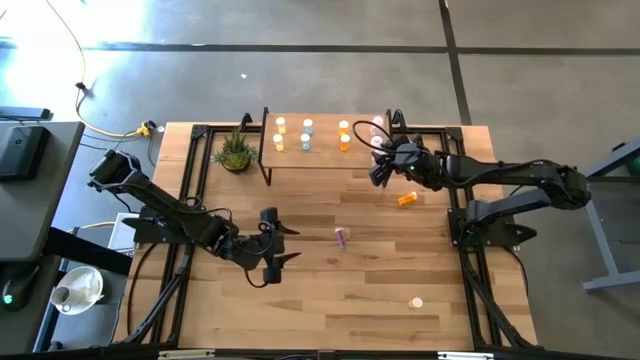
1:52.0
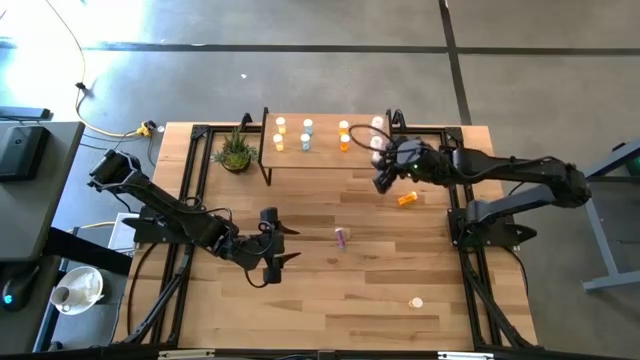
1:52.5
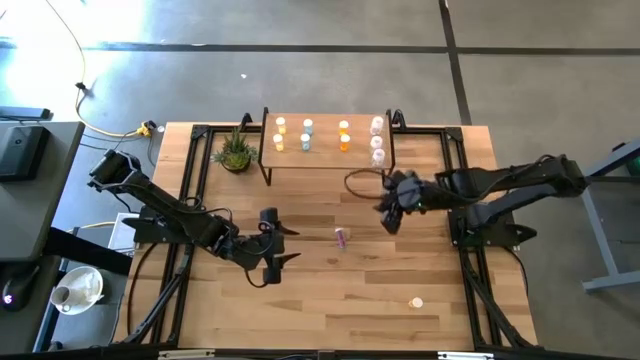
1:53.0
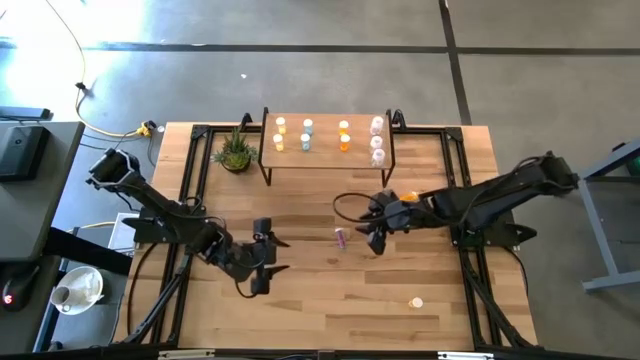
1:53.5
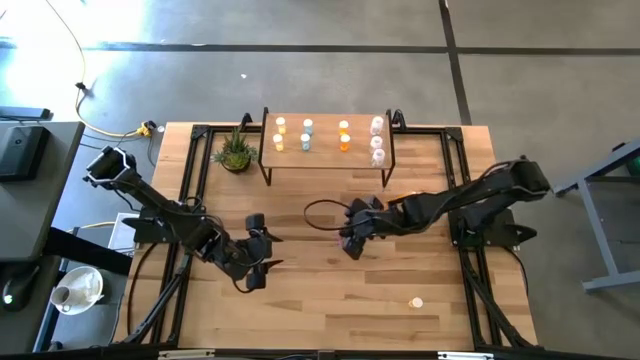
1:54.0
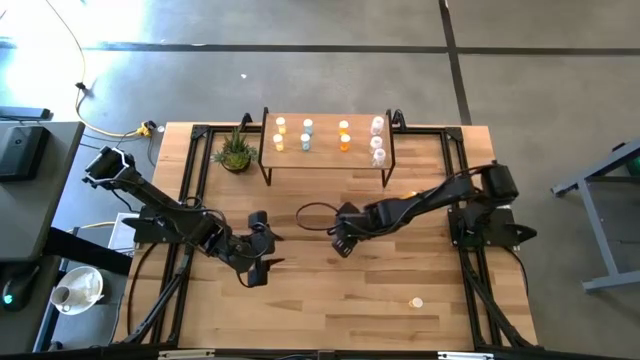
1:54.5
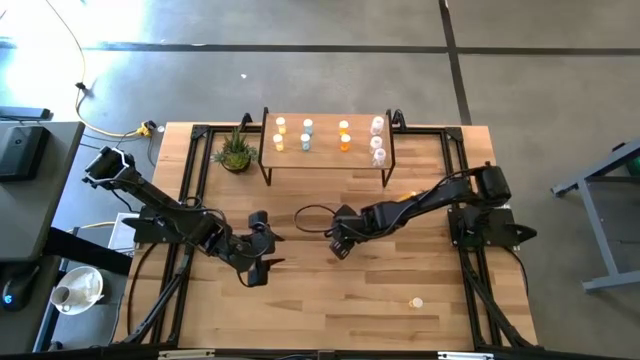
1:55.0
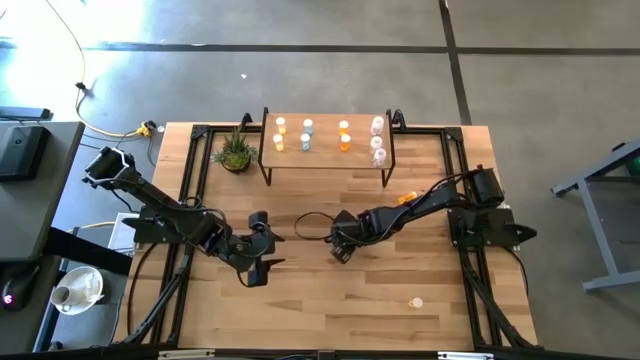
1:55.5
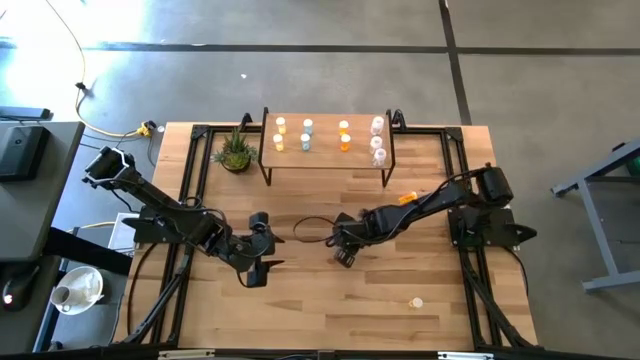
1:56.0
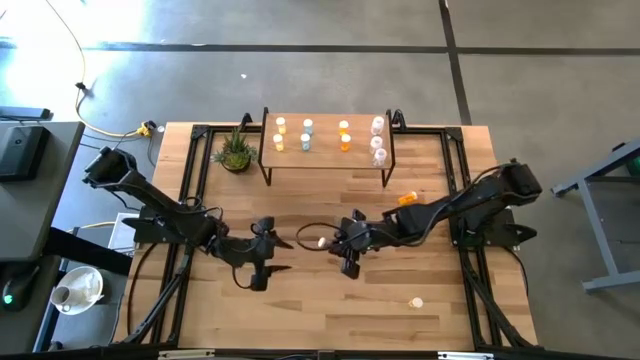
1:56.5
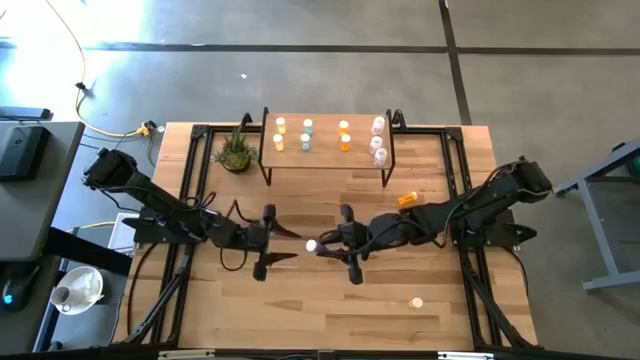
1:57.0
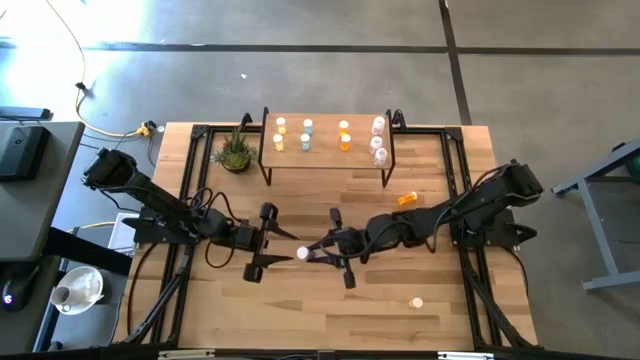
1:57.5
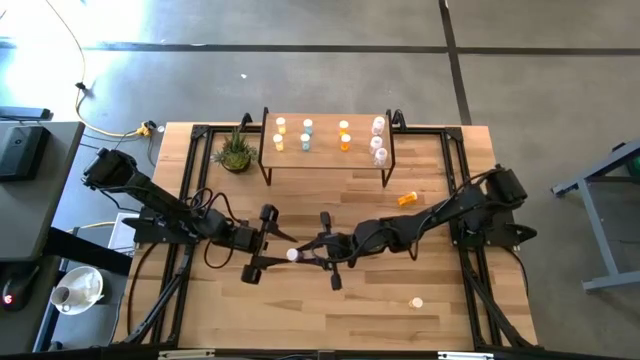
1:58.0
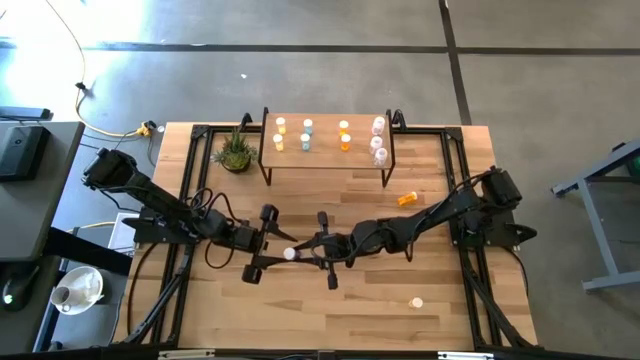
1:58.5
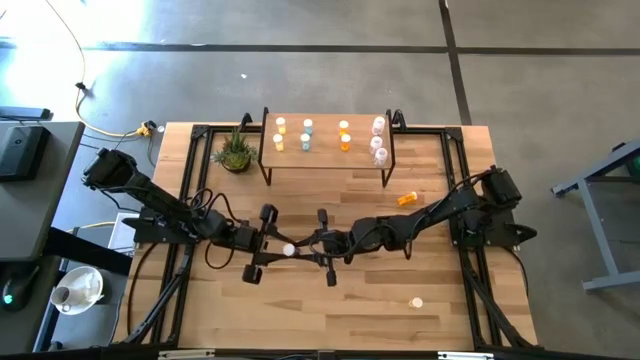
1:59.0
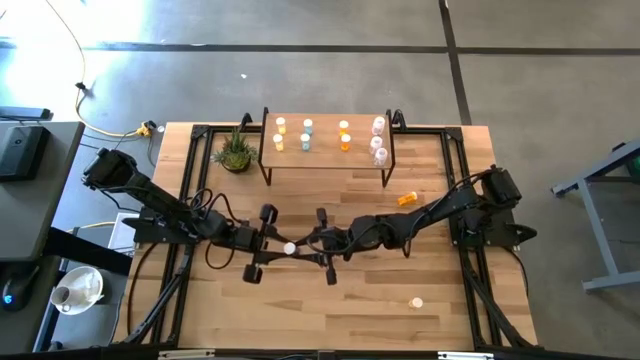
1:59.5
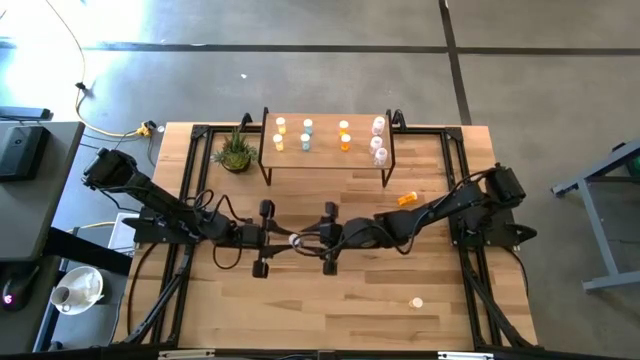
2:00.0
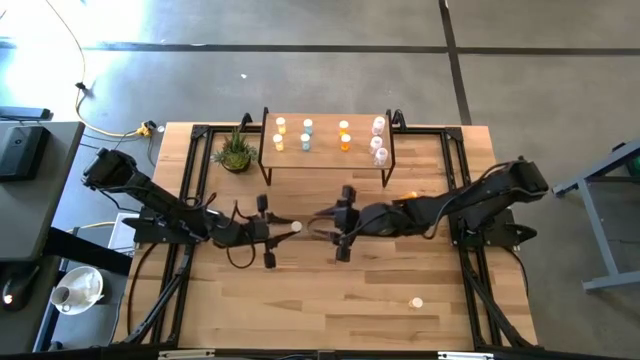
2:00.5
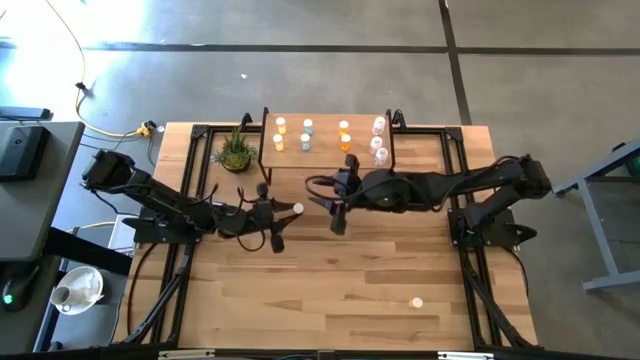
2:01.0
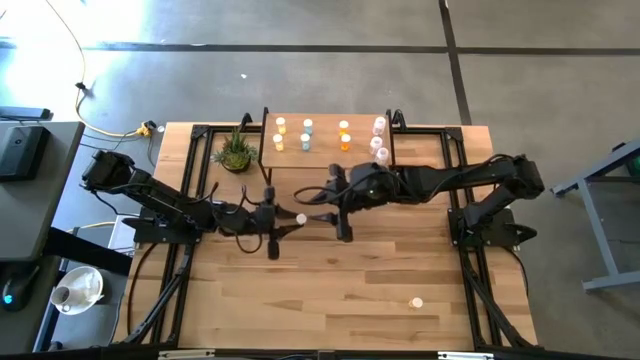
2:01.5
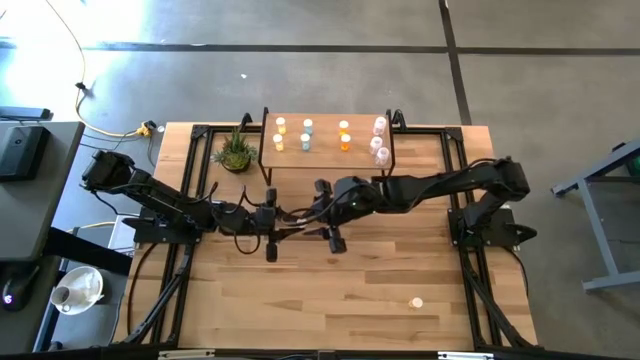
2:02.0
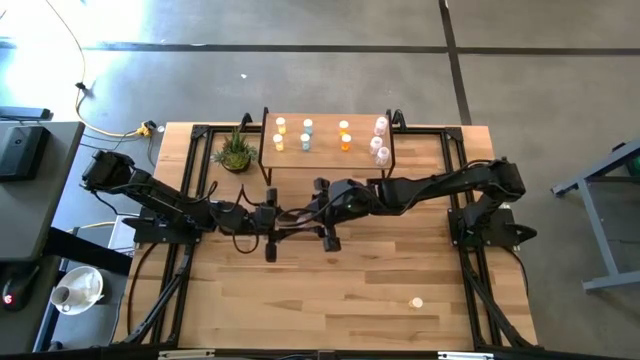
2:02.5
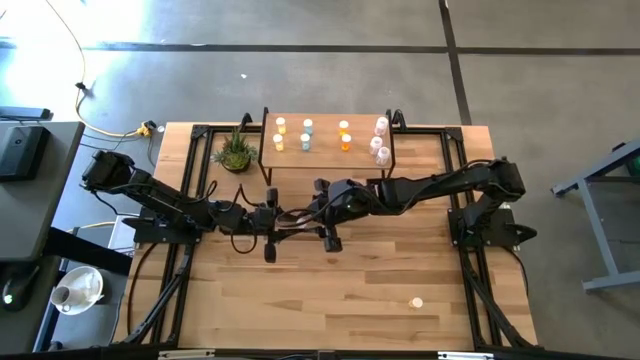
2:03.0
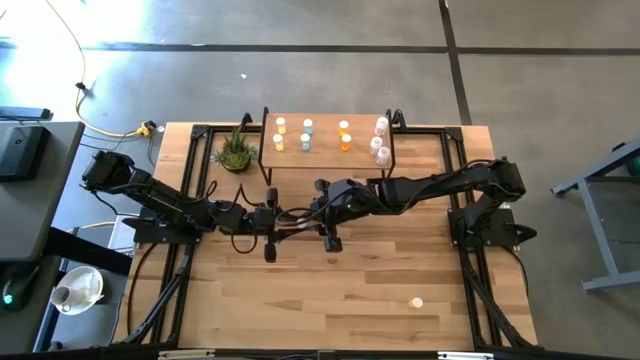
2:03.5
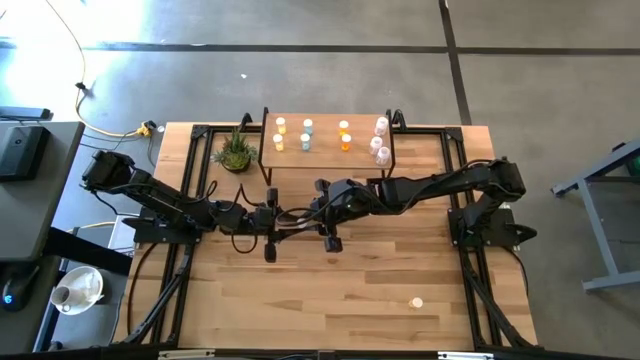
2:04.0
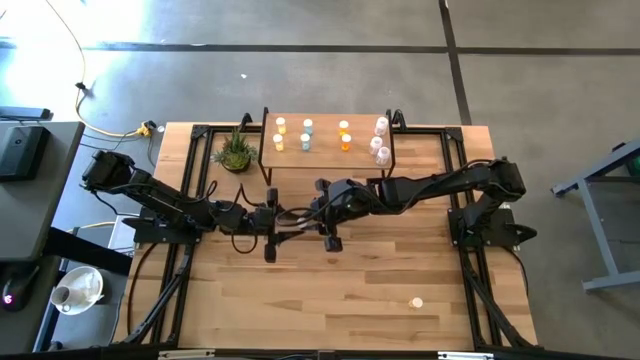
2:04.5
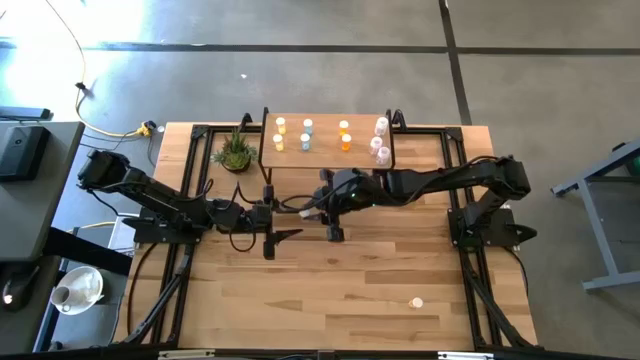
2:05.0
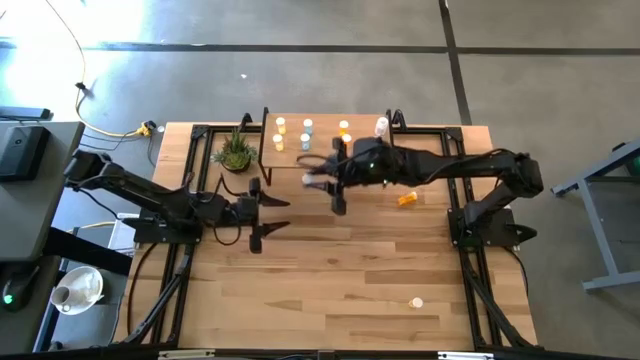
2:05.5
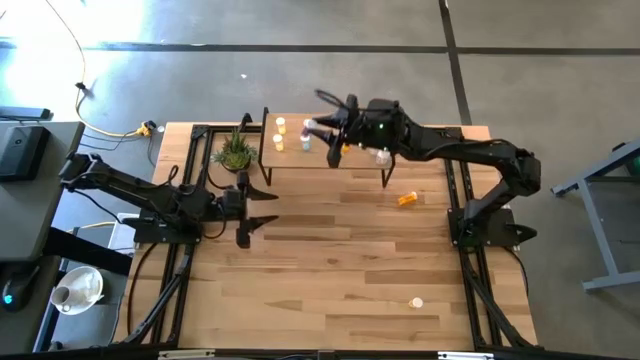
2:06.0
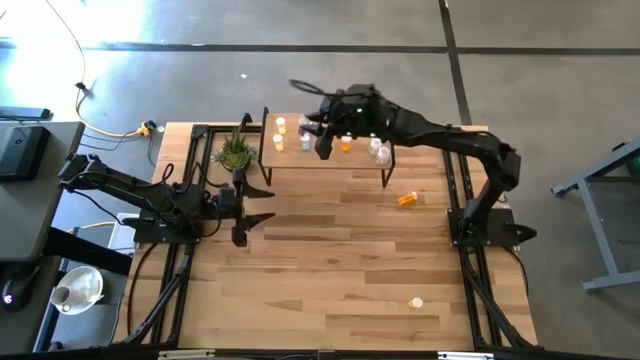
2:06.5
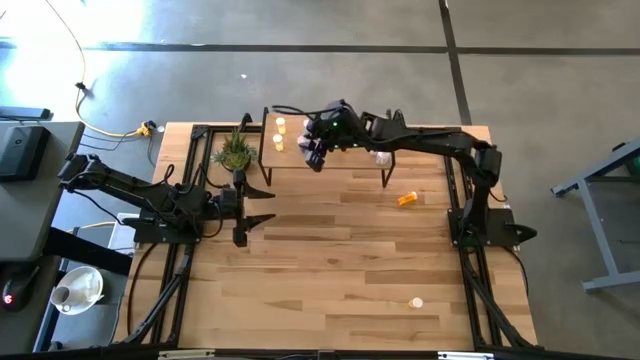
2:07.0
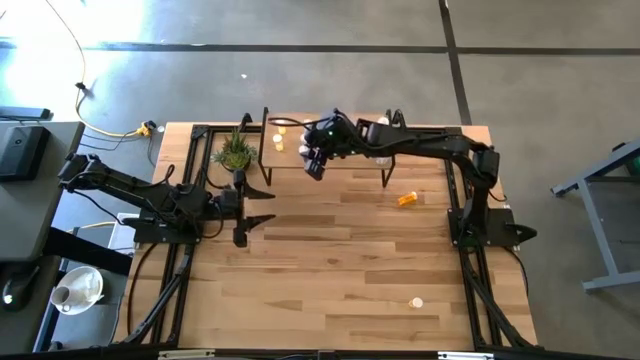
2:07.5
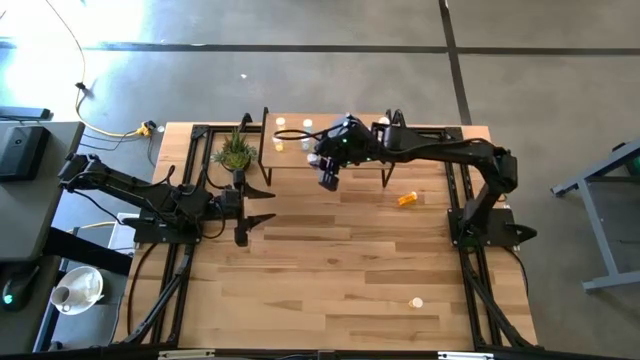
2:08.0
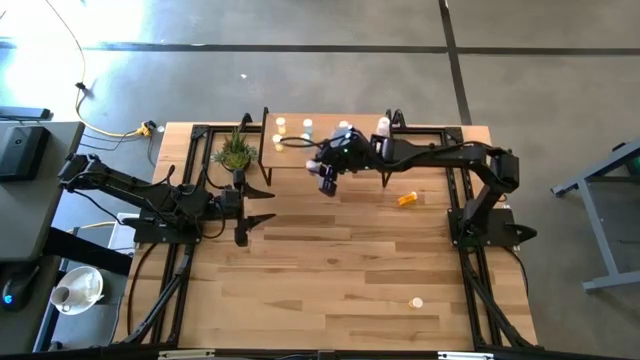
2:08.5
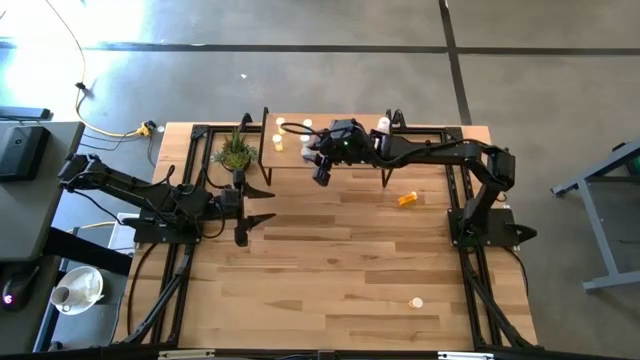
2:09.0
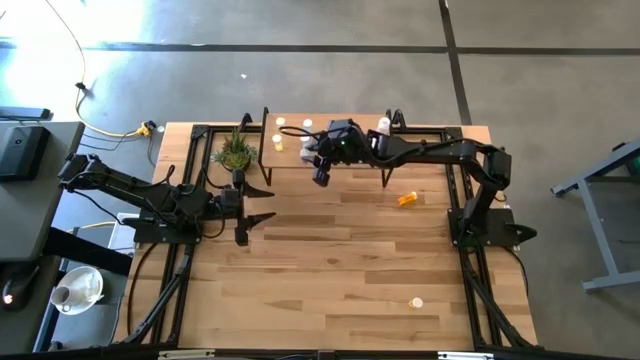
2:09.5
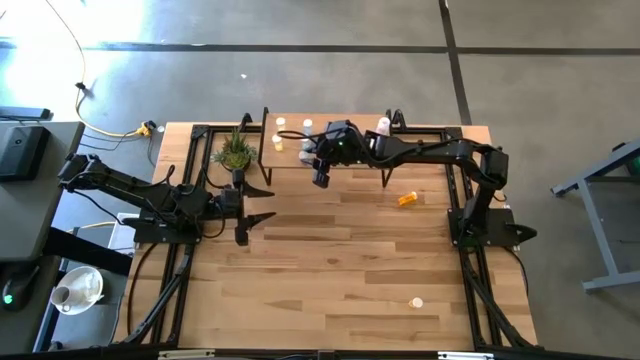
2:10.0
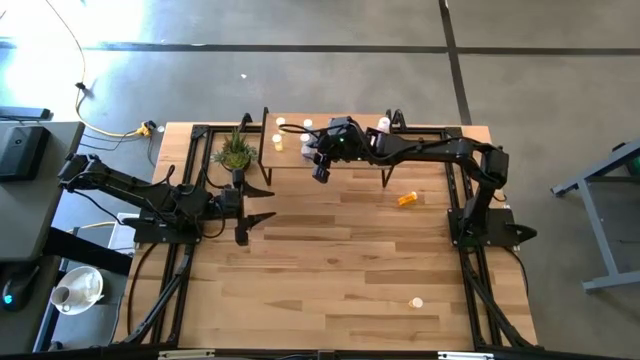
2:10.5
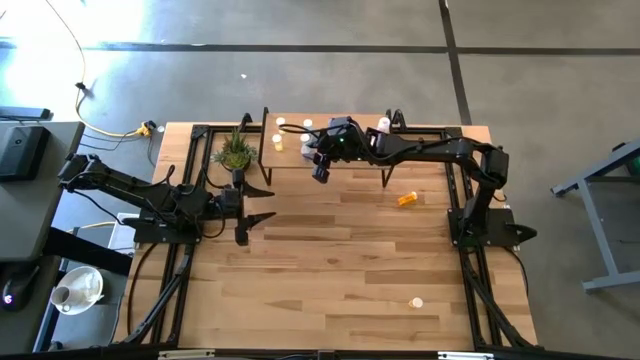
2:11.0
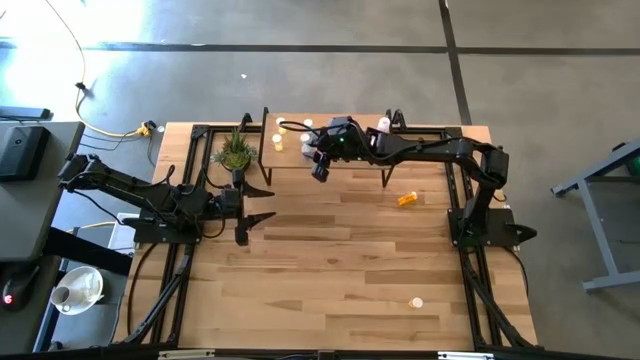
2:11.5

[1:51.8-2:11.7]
Task: Pick and place medicine bottles onto shelf by color
Put the blue pill bottle on the shelf aligned with the other blue pill bottles
